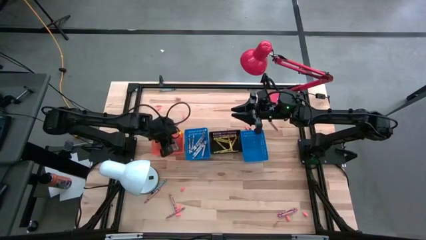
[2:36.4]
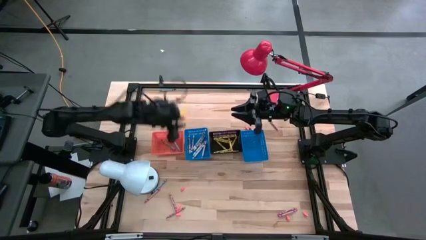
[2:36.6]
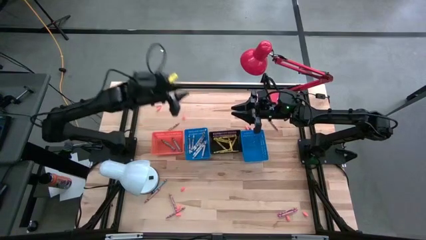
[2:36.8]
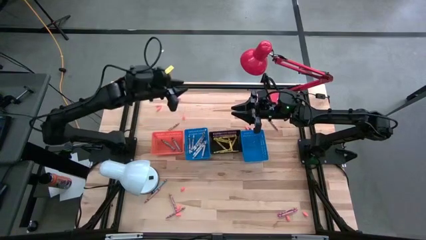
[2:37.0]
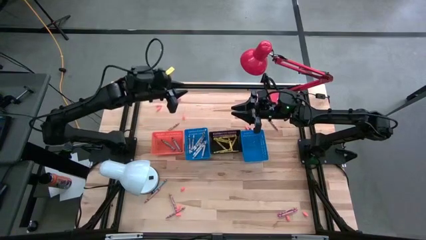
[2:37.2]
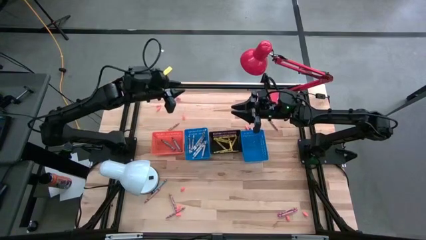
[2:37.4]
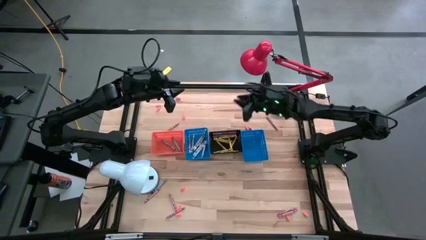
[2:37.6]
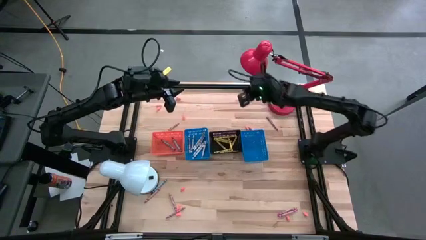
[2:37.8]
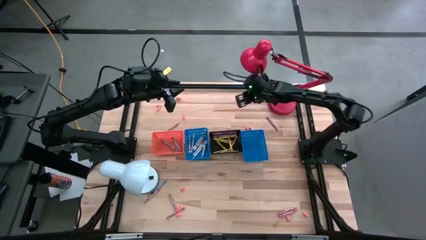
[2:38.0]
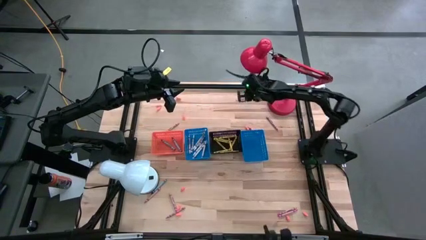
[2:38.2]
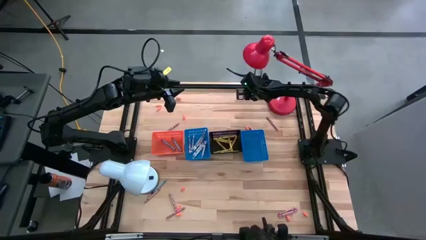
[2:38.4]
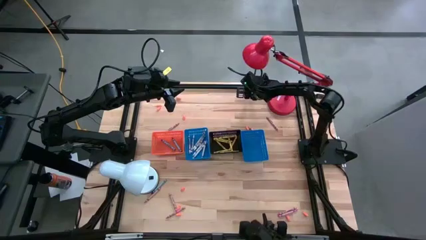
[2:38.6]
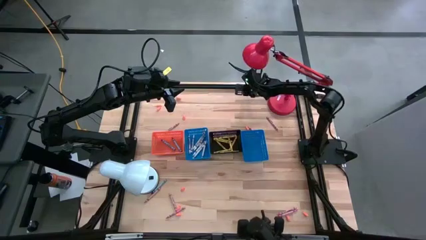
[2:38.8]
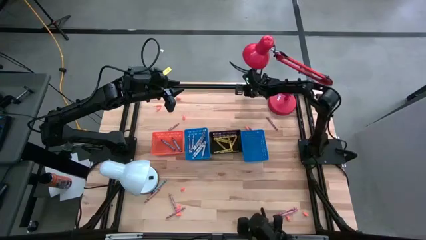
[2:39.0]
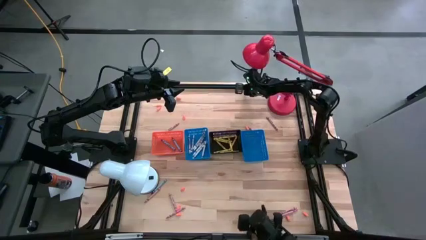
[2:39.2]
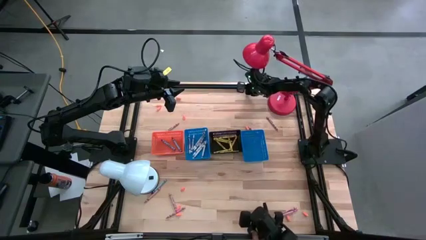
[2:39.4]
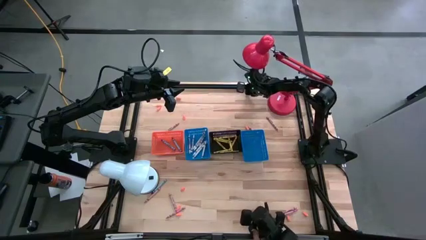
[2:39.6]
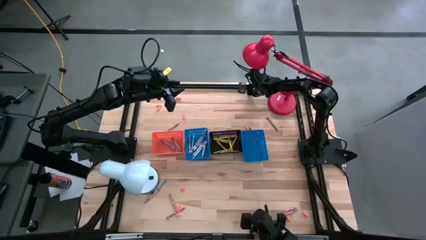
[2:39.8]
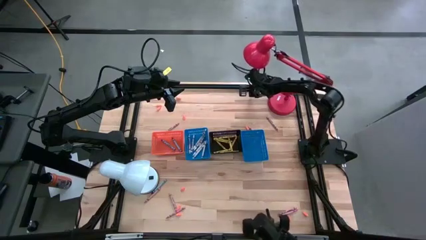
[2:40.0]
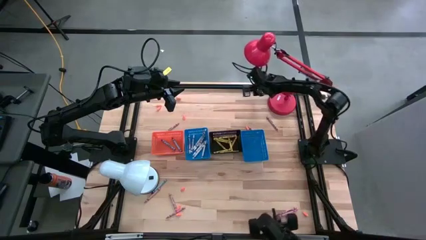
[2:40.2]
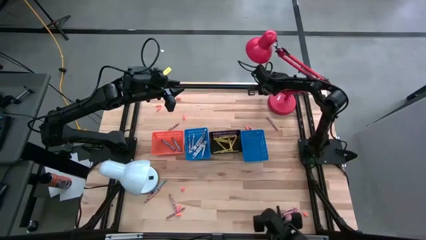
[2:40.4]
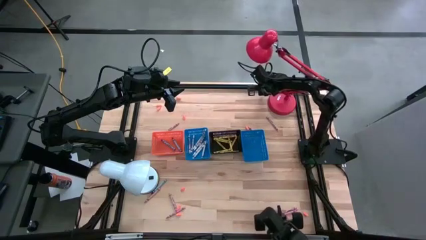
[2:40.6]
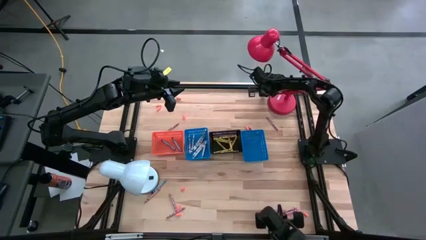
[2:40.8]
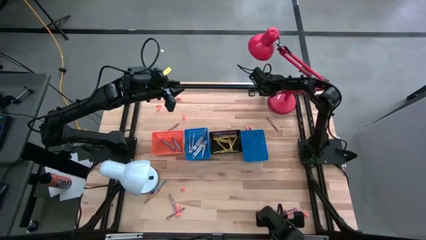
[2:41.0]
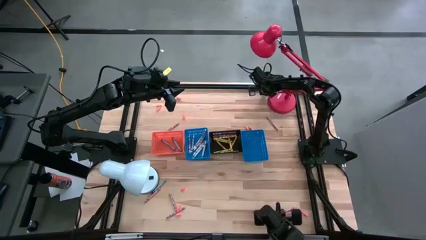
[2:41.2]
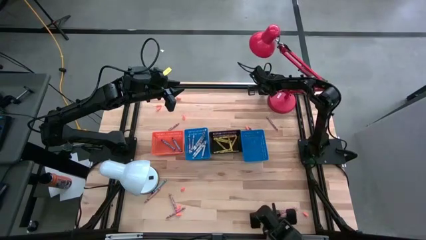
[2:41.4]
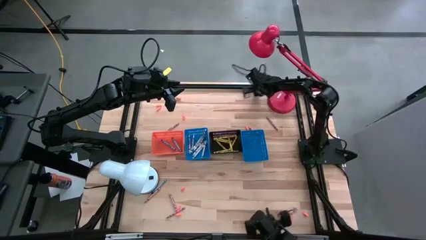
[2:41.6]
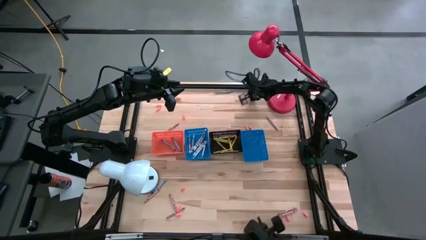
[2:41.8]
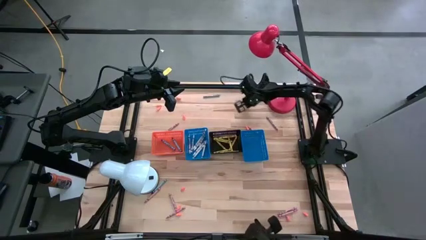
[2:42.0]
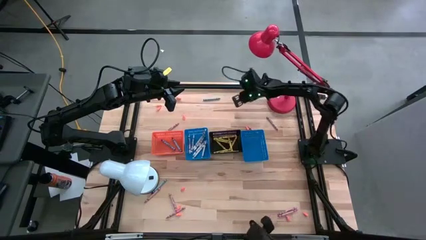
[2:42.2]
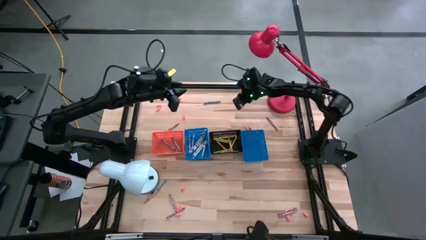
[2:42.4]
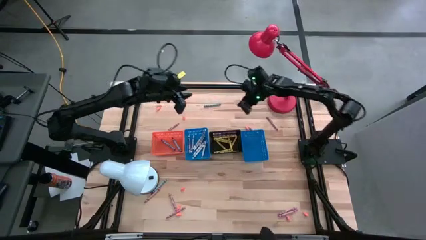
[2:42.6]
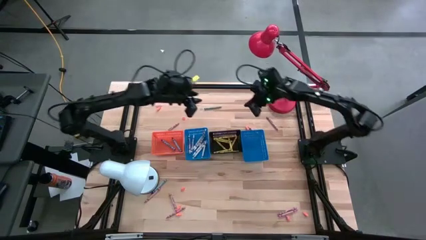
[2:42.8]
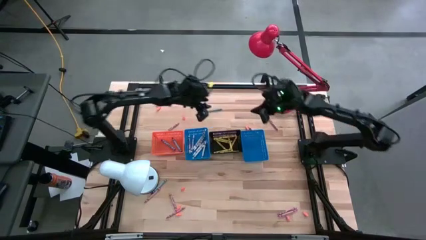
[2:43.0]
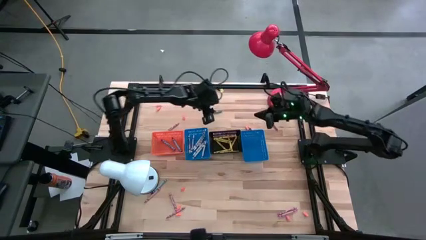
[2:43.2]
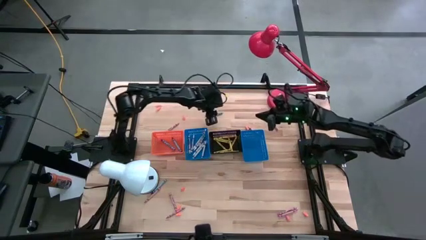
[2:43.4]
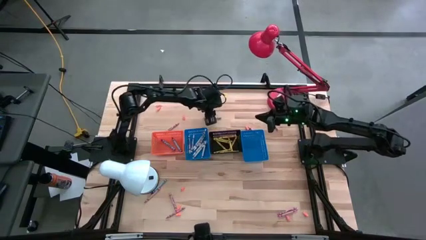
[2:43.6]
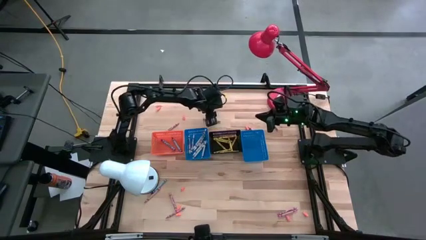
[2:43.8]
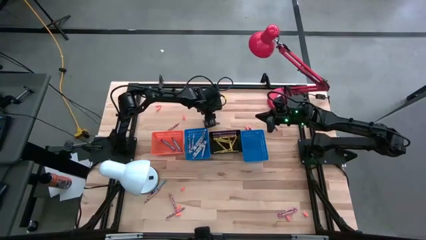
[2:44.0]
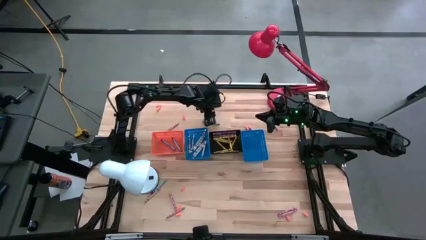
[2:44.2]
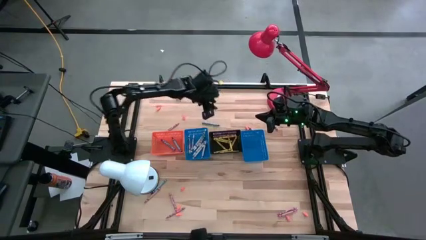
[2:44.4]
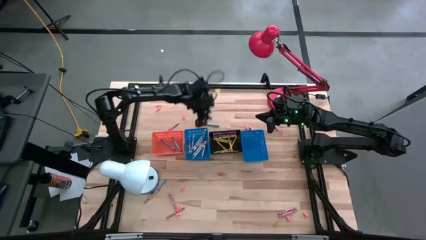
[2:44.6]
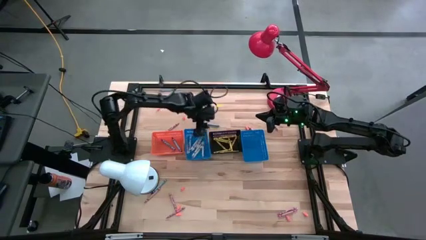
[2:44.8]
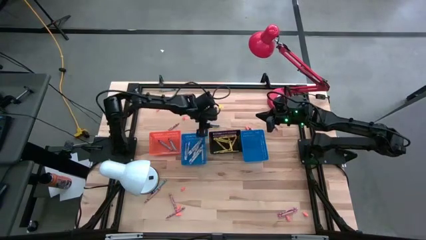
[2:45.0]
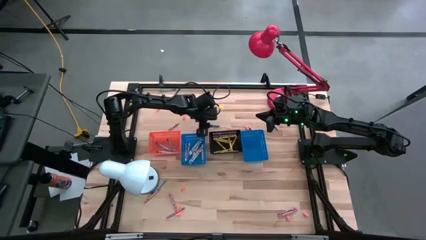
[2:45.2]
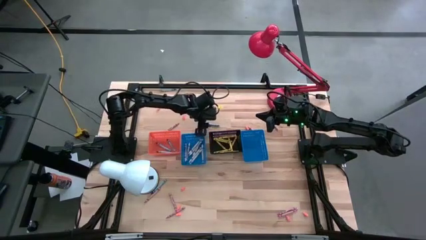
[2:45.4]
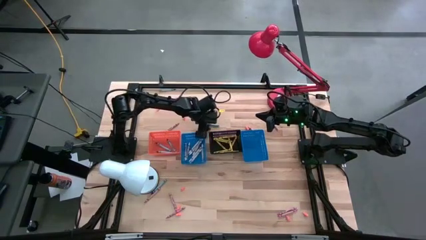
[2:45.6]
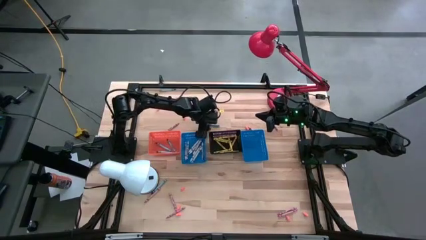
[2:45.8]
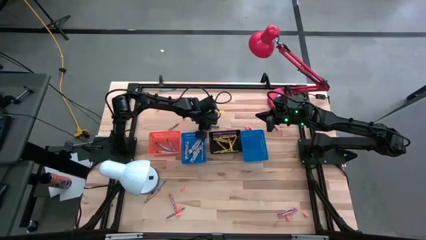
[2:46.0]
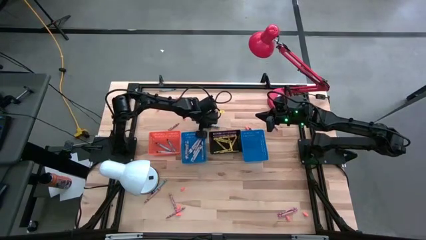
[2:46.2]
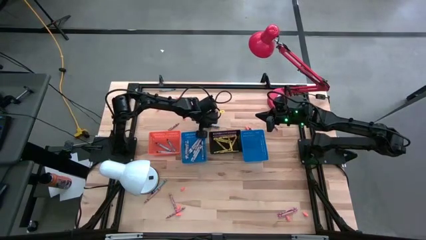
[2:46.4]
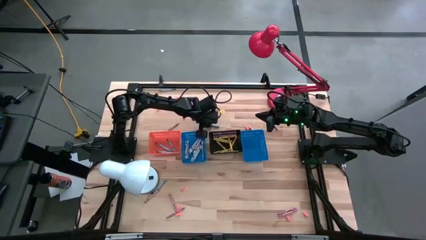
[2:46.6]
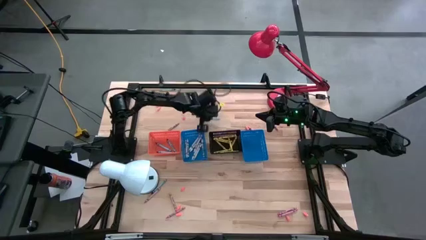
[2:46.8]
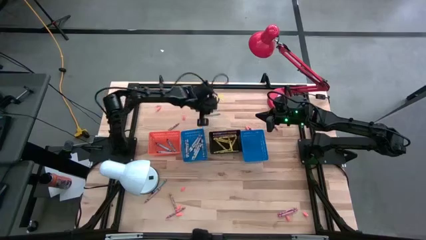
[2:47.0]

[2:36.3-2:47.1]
Task: Sort crayons
Put the blue crayon into the orange bin

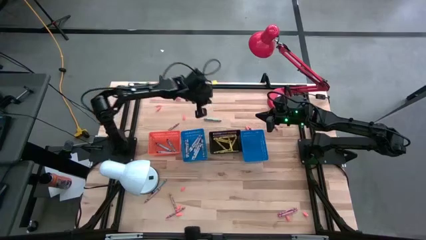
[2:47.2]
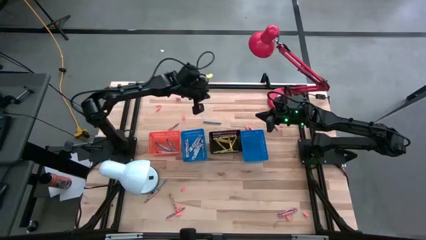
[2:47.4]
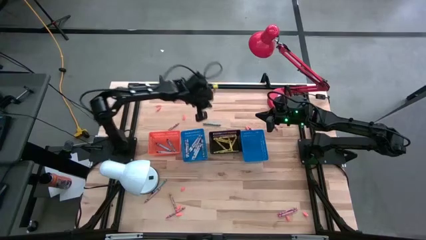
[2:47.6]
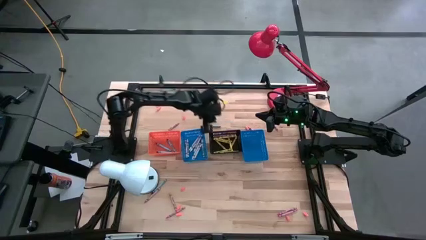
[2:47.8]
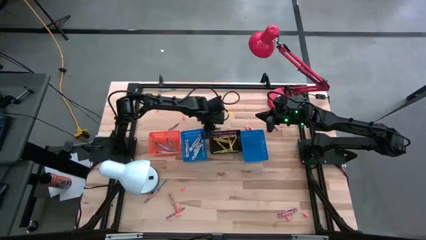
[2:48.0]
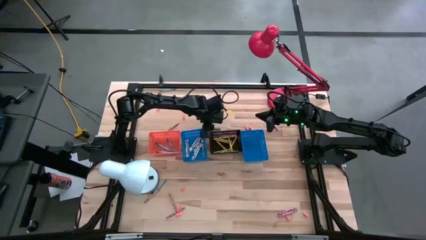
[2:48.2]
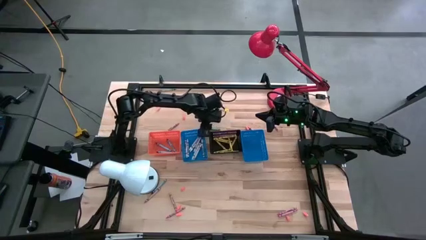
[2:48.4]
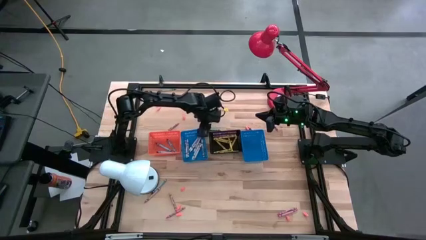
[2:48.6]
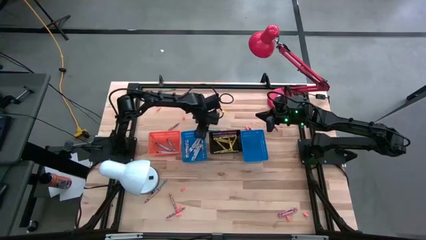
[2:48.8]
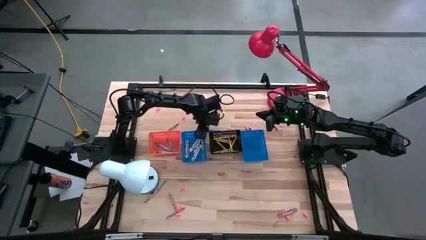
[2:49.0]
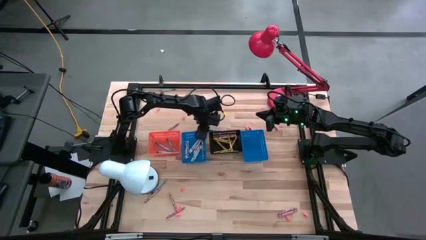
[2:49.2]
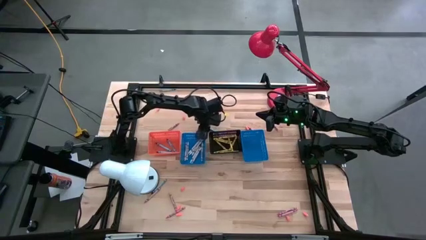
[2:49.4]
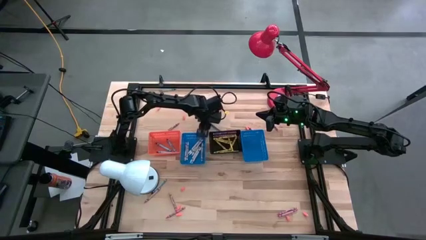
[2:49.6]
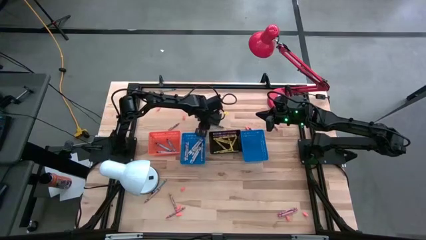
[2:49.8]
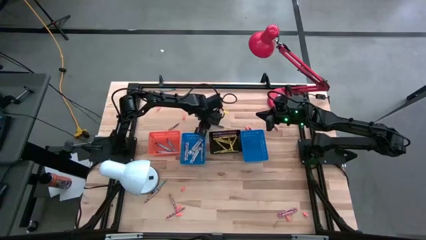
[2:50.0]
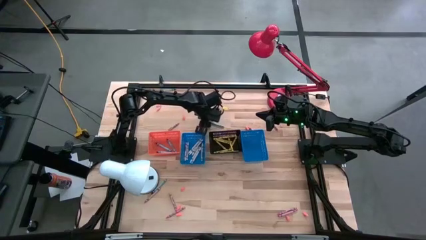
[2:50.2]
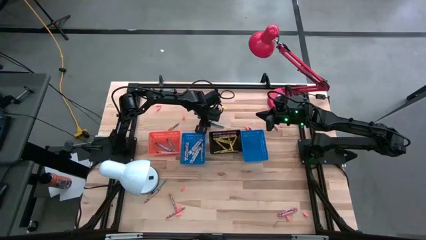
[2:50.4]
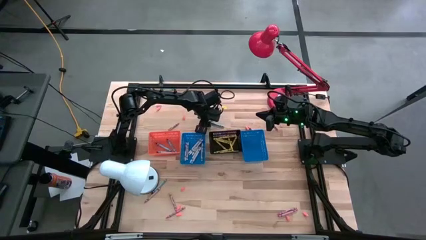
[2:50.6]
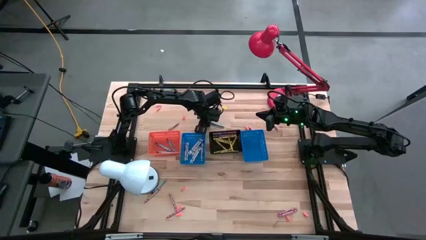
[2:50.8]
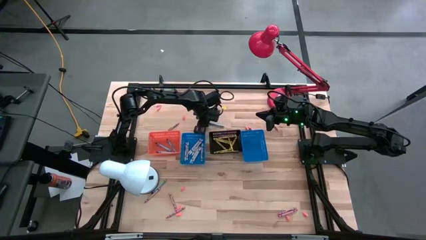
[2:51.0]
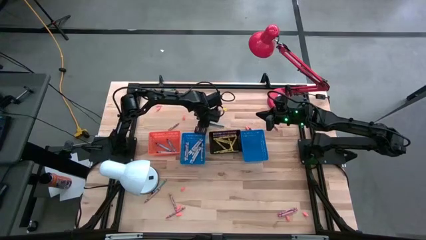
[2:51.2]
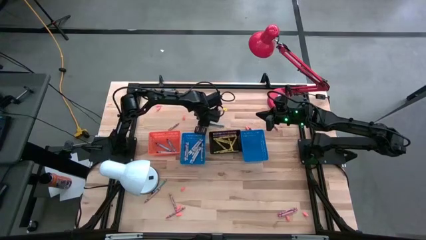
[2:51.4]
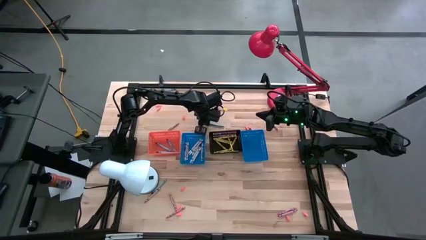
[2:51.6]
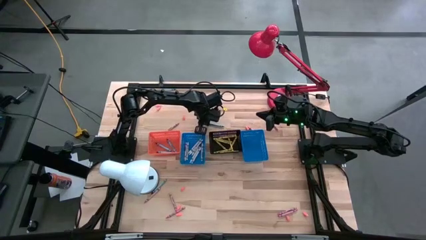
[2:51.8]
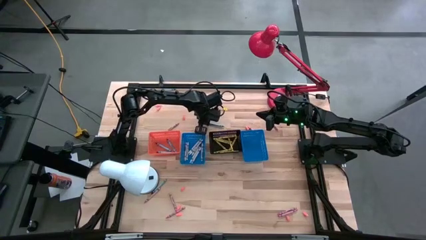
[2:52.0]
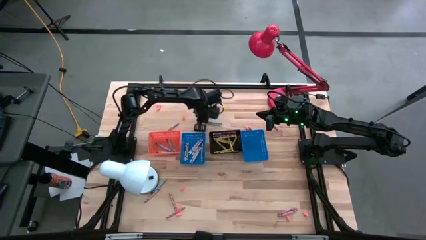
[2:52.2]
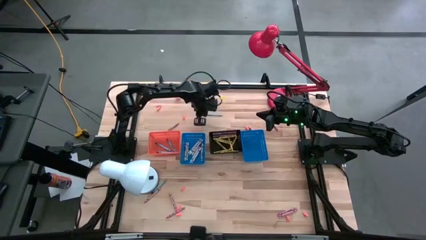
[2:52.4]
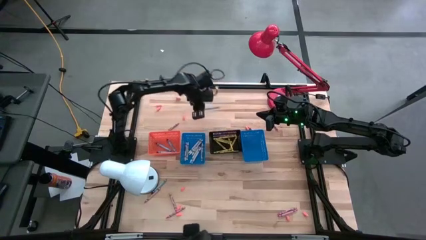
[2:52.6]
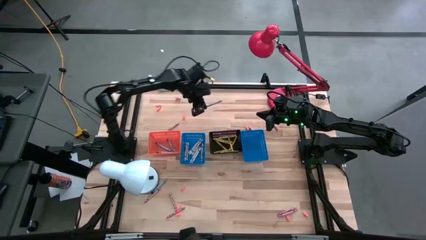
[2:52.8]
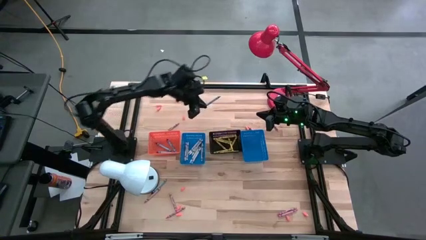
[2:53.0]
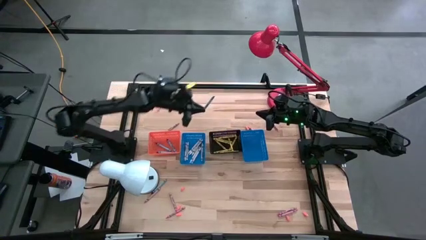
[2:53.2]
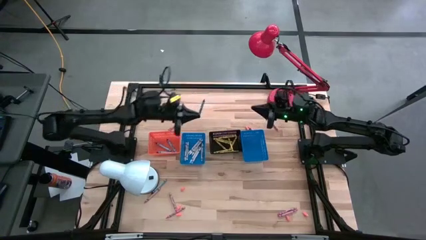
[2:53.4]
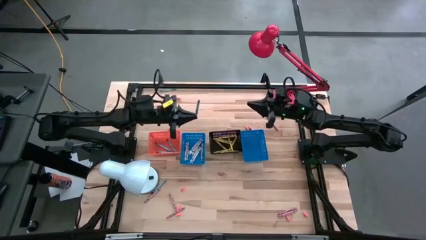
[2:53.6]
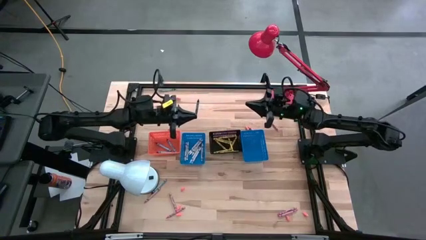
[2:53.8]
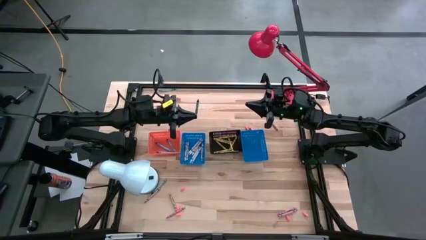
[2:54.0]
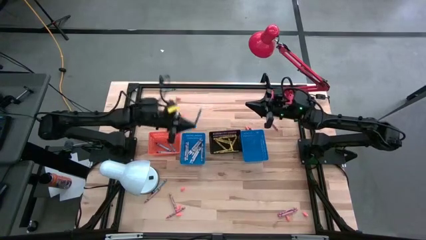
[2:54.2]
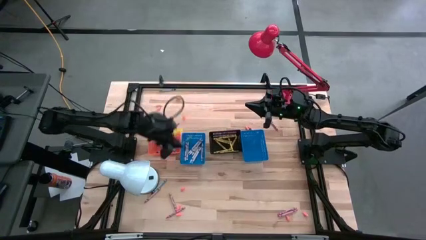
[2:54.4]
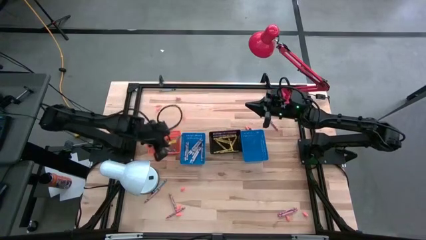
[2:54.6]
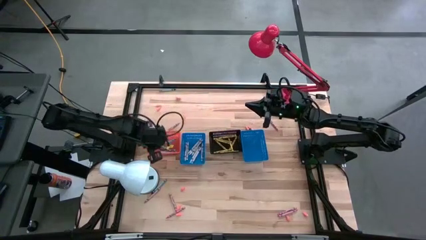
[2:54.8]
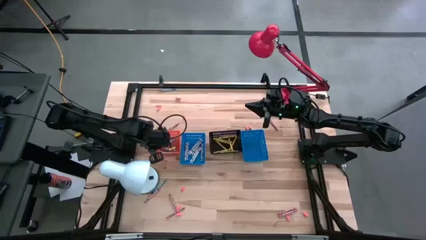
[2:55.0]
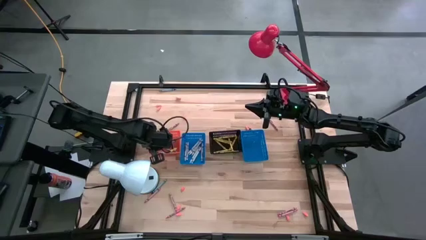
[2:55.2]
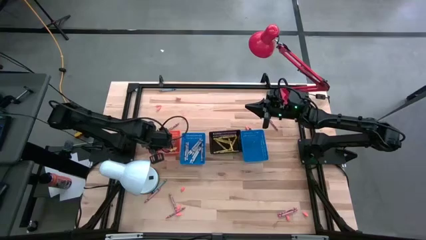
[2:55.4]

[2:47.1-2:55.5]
Put the blue crayon into the orange bin
